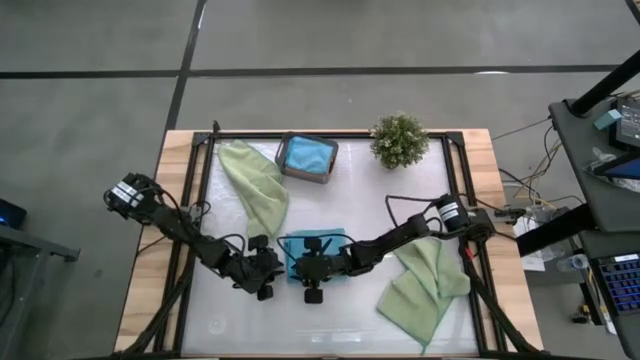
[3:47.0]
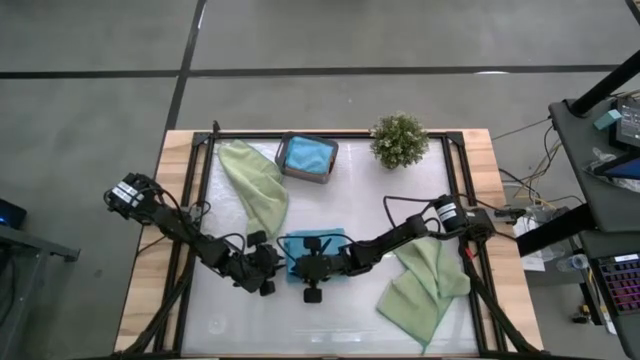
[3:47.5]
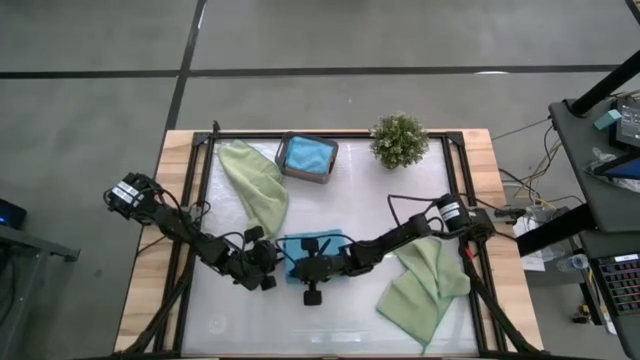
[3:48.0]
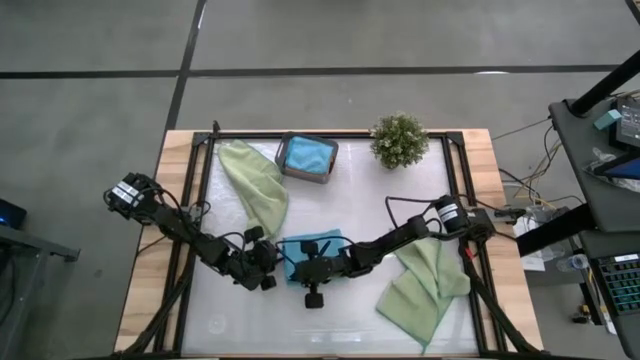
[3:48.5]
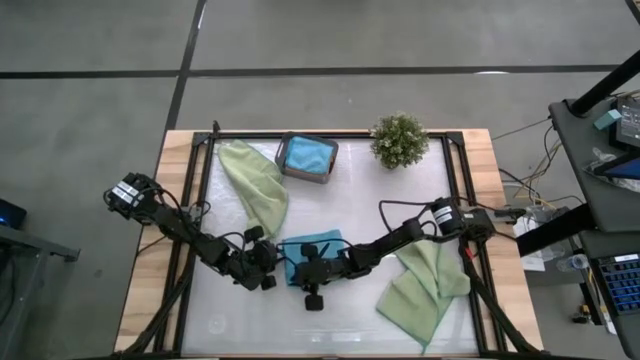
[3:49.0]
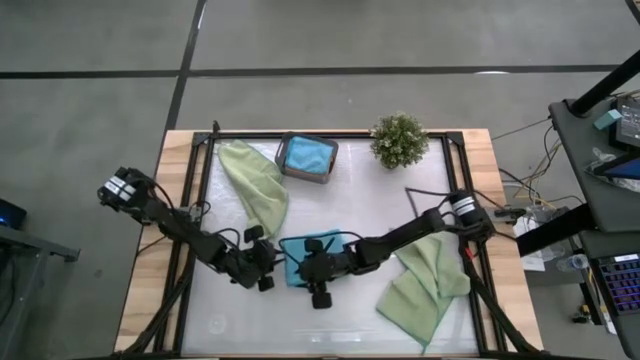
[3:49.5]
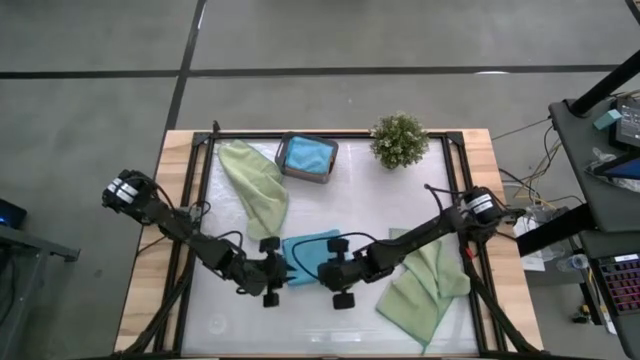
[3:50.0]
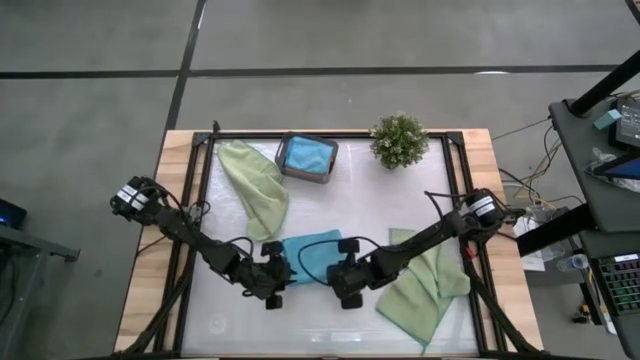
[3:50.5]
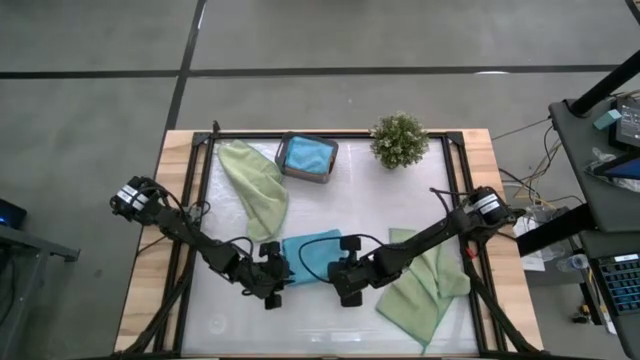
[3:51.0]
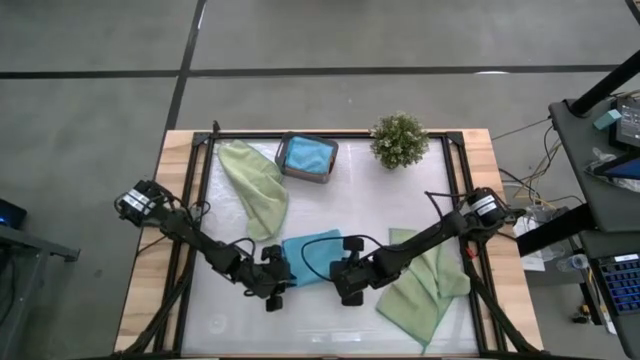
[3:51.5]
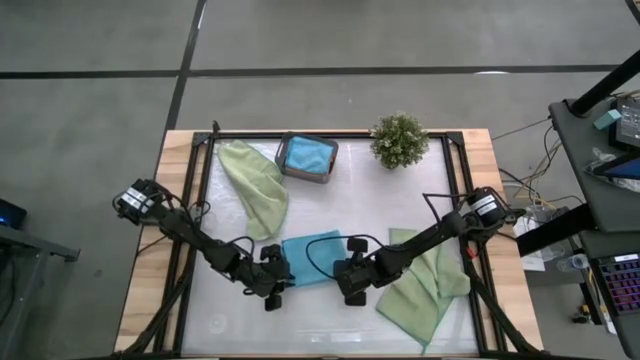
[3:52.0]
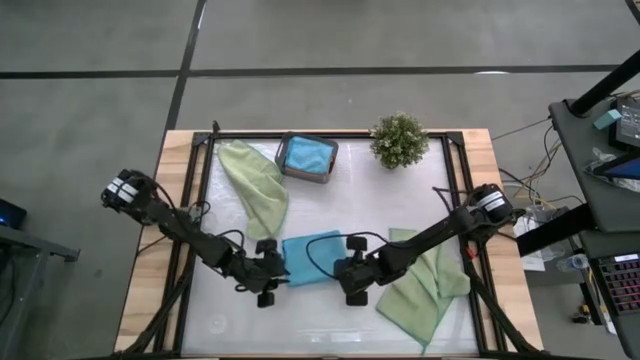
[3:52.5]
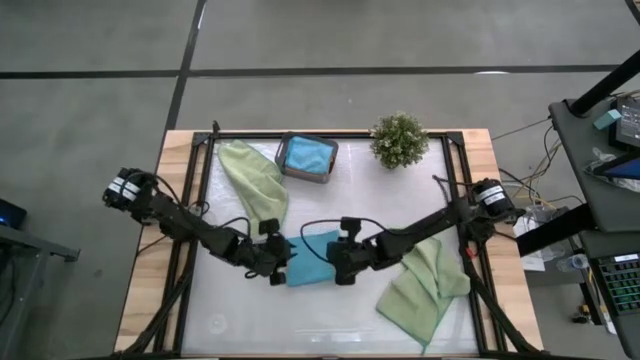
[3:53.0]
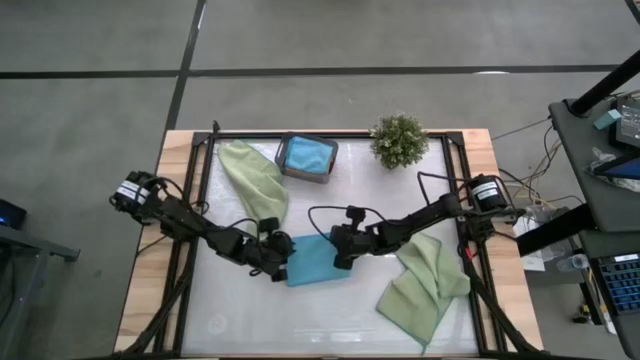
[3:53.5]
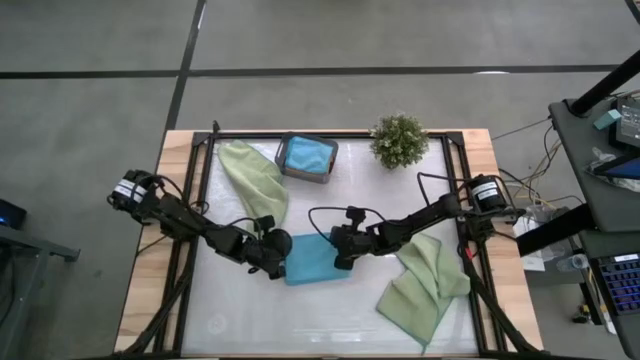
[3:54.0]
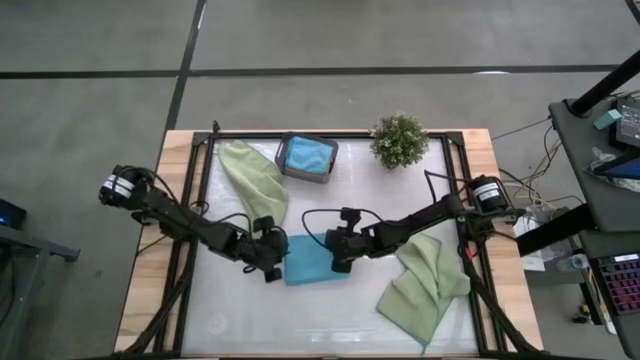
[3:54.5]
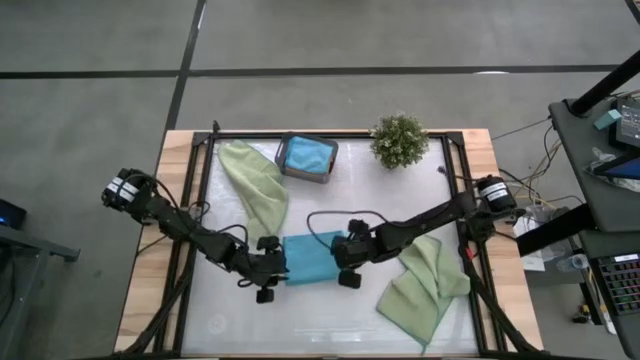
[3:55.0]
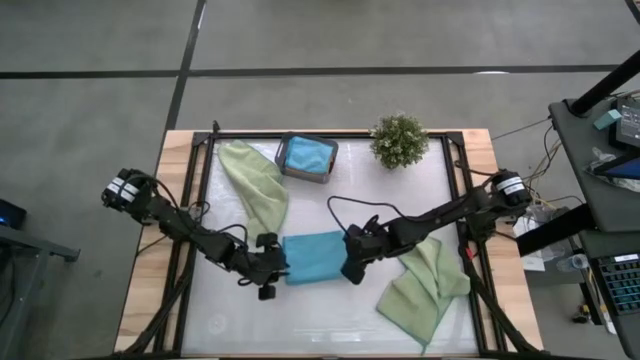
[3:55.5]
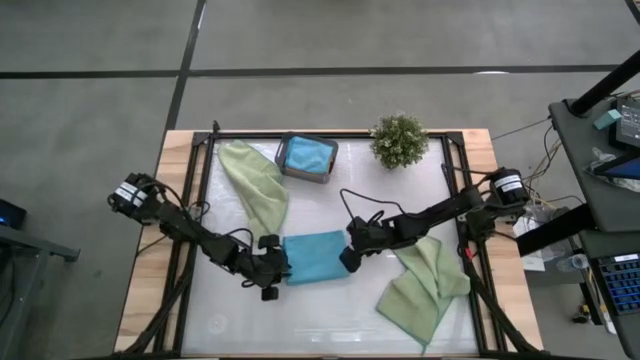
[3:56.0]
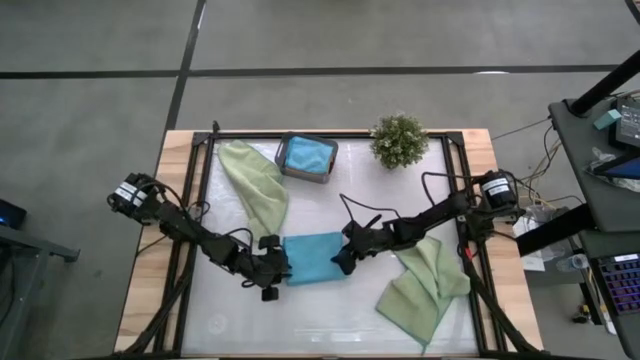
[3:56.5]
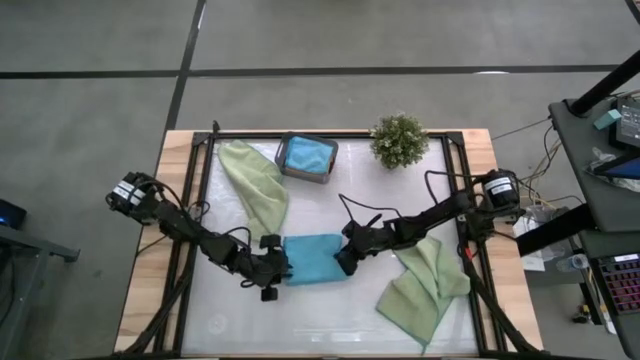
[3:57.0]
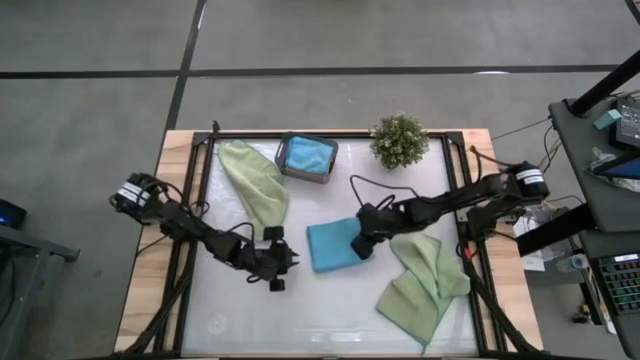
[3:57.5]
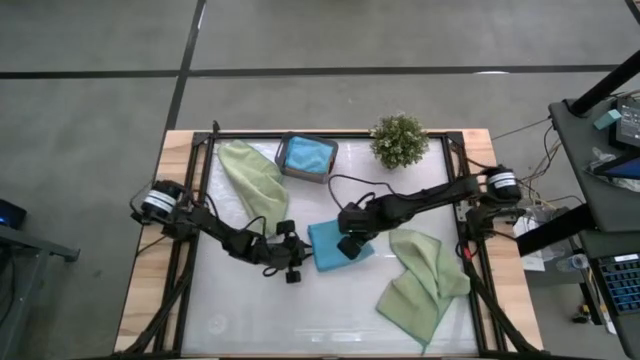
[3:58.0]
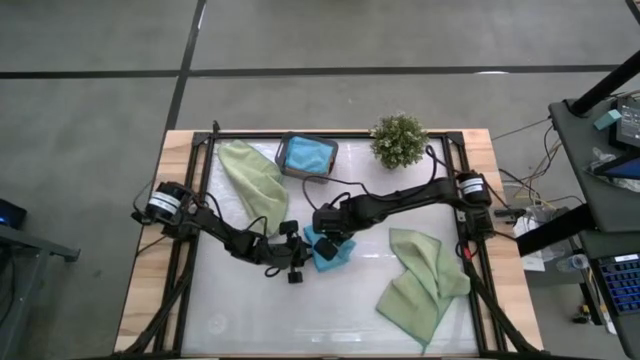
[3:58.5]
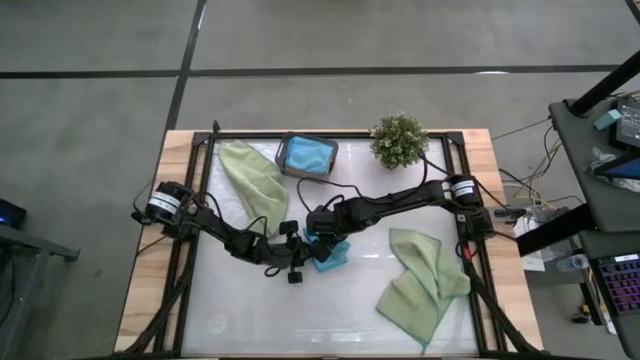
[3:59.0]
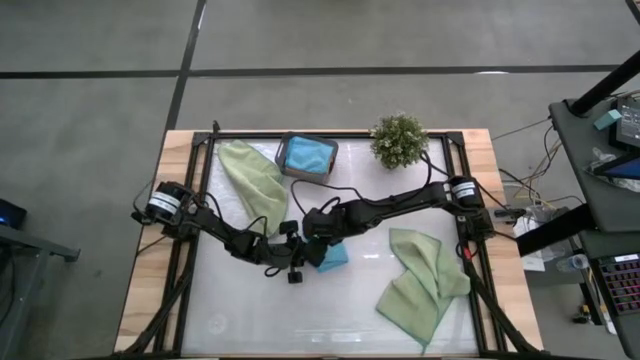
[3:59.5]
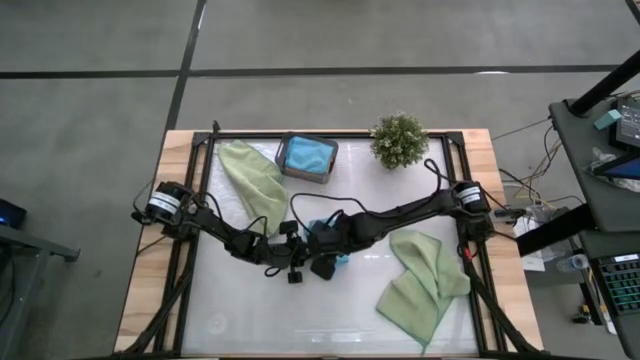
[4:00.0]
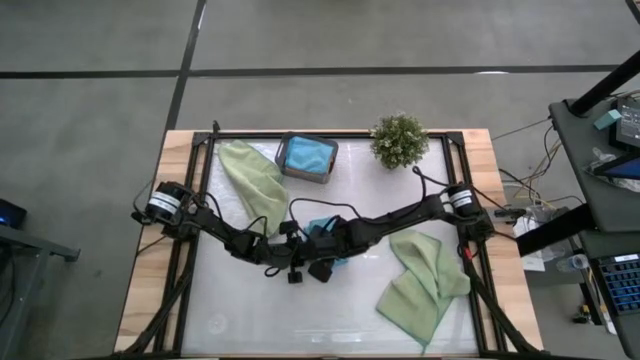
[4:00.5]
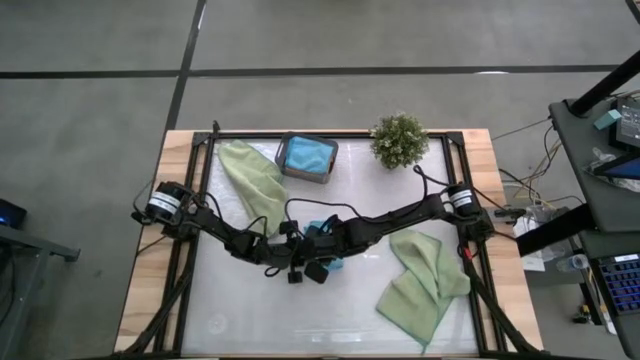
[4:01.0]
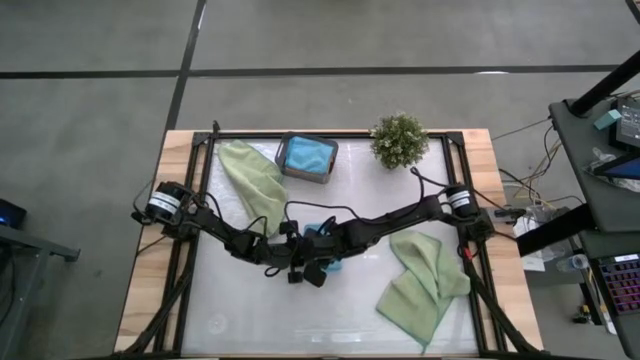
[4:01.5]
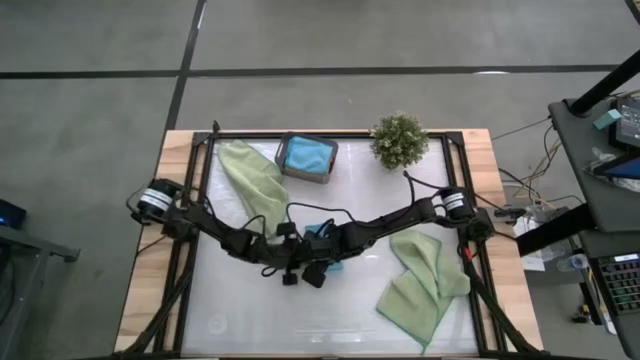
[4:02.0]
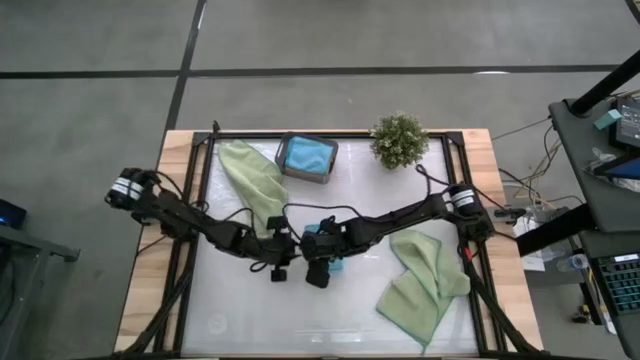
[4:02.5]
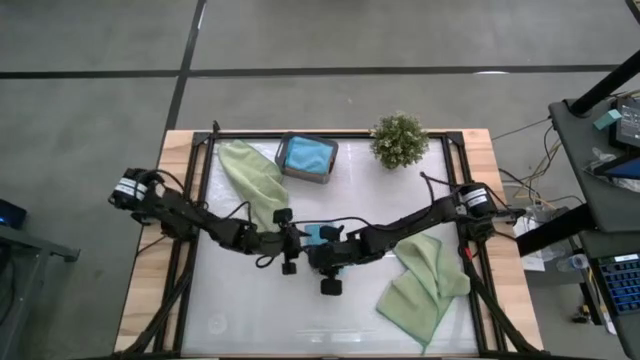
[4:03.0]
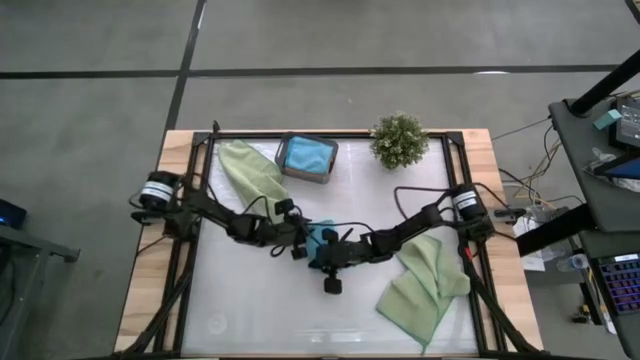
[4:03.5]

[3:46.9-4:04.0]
Task: Fold microfiber towels
Fold the blue microfiber towel

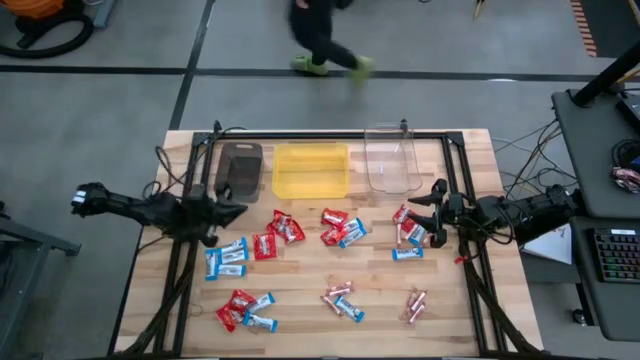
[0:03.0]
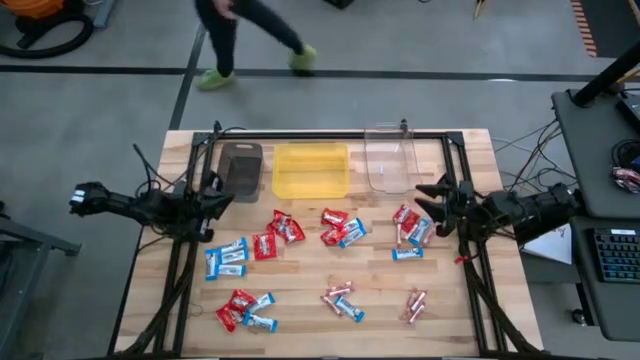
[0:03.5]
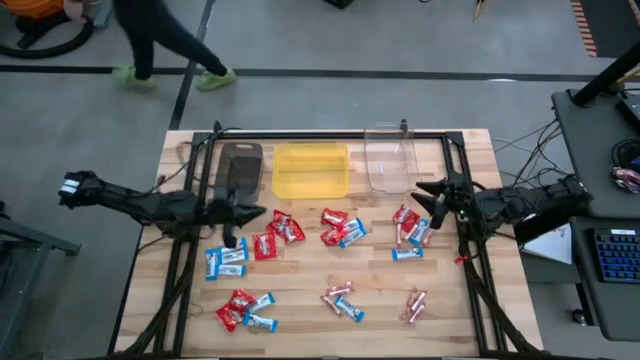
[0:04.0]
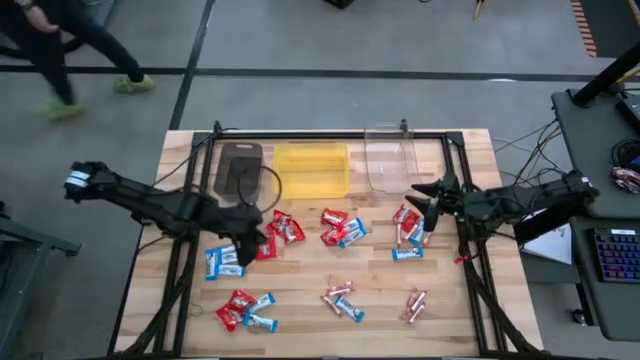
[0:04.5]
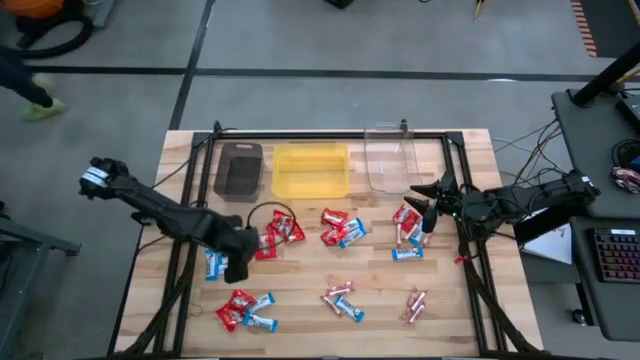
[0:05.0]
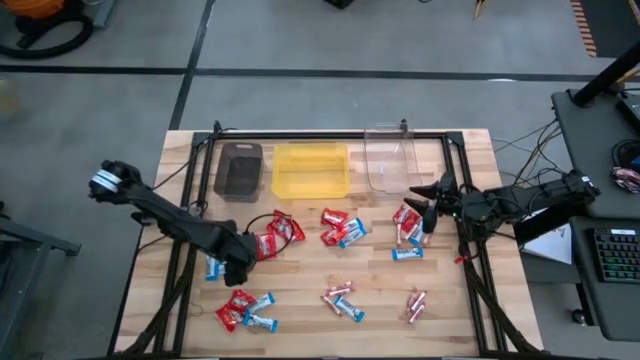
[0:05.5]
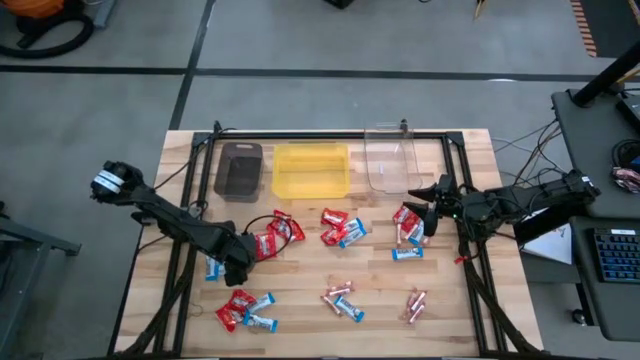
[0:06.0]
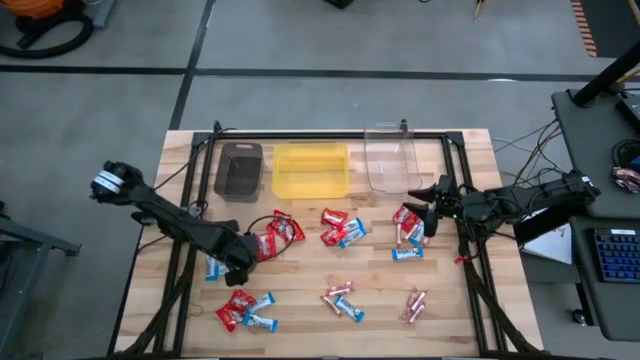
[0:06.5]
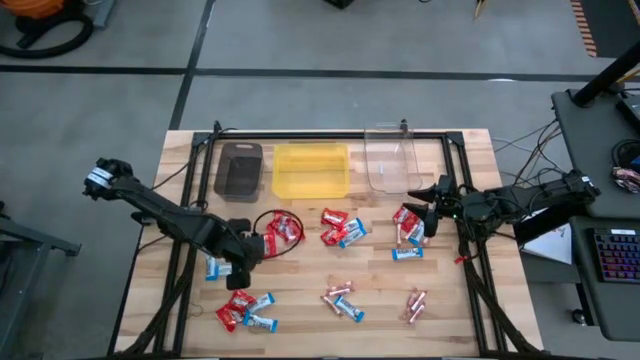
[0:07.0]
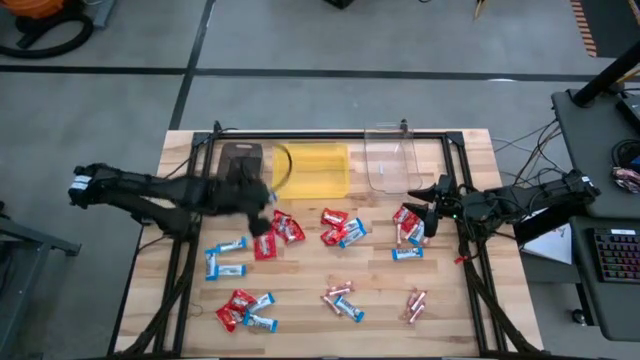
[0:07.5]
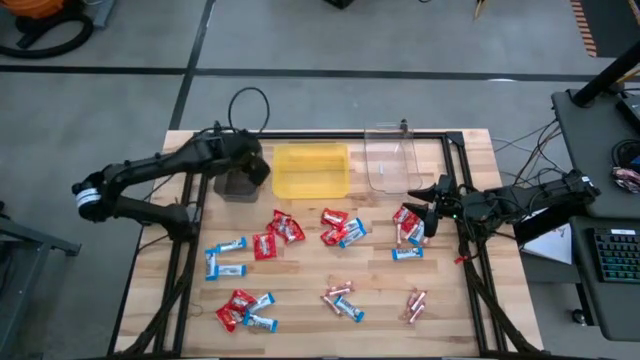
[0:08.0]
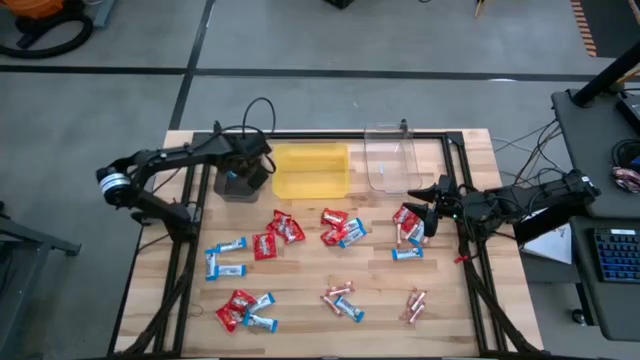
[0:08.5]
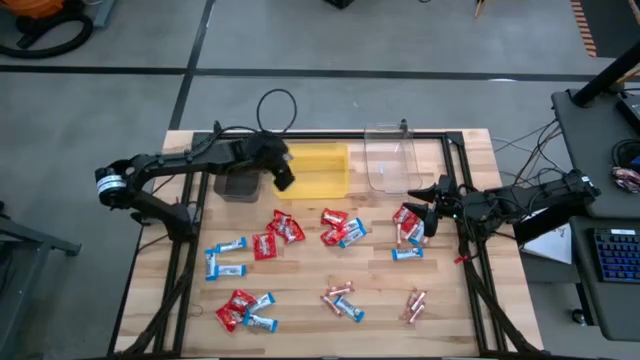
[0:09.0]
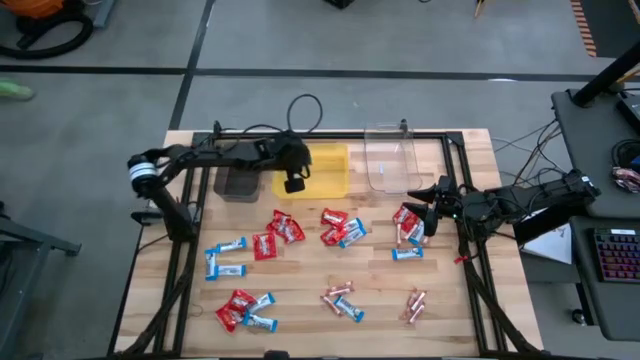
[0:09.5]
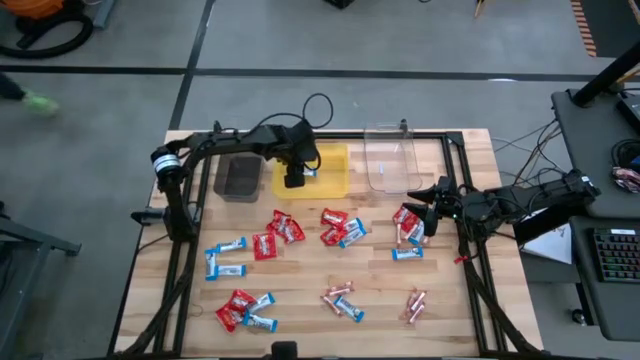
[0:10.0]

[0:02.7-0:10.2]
Task: Sort candy
Put the white candy into the yellow bin
